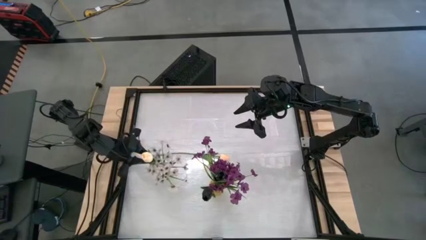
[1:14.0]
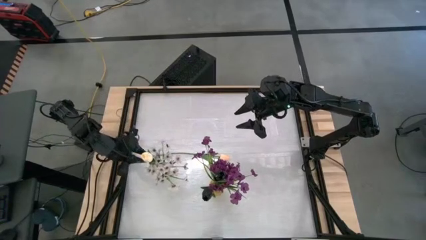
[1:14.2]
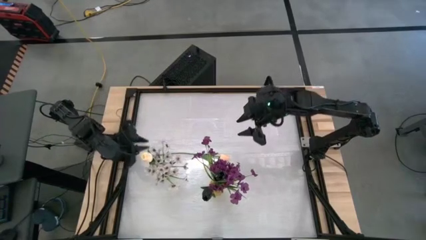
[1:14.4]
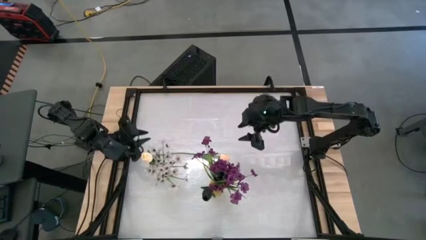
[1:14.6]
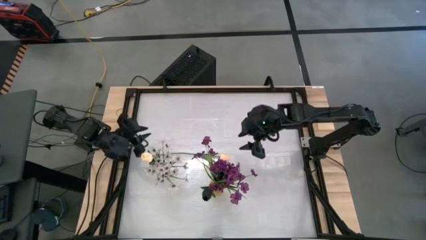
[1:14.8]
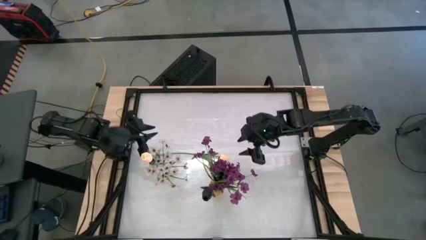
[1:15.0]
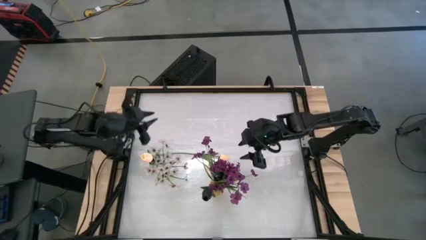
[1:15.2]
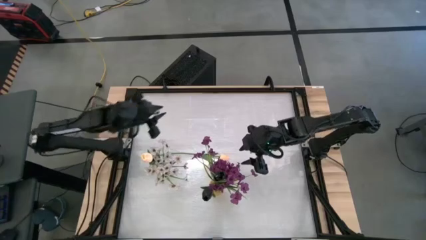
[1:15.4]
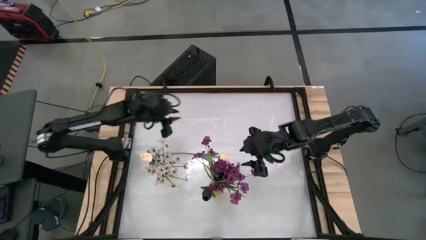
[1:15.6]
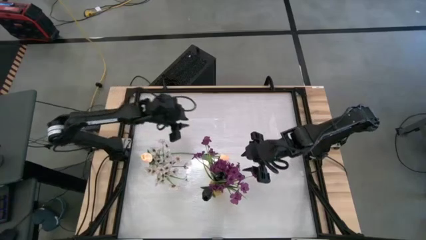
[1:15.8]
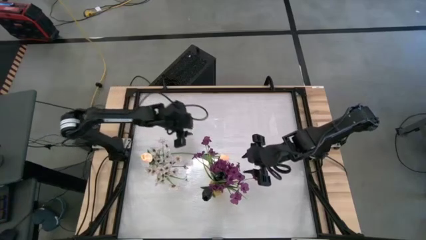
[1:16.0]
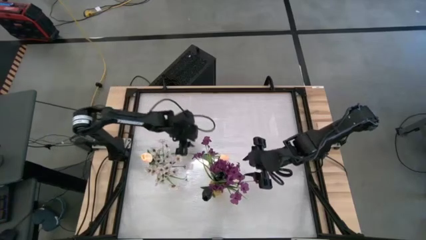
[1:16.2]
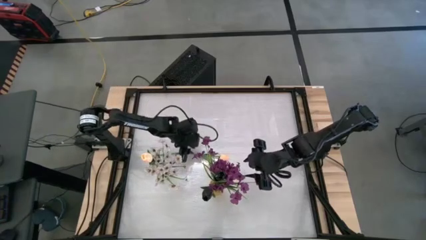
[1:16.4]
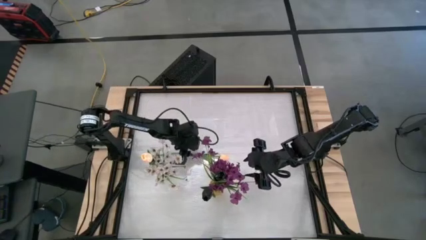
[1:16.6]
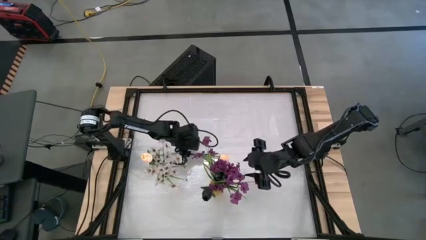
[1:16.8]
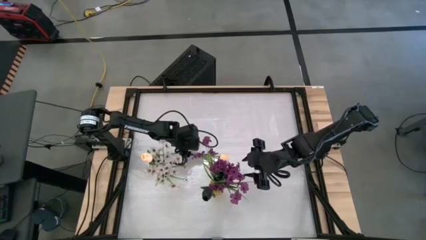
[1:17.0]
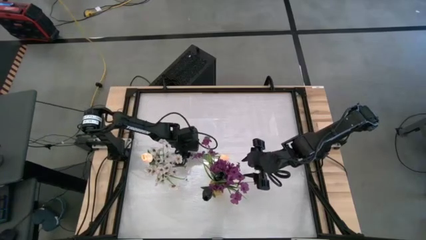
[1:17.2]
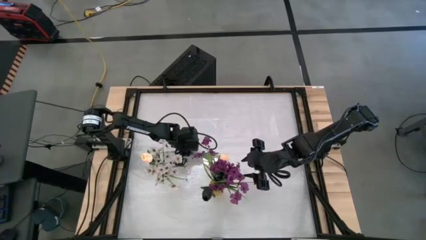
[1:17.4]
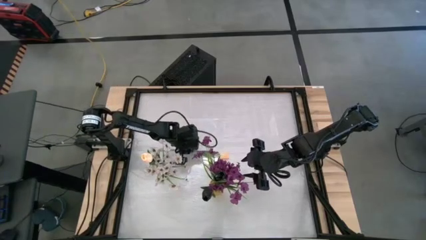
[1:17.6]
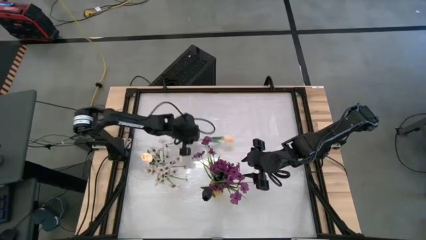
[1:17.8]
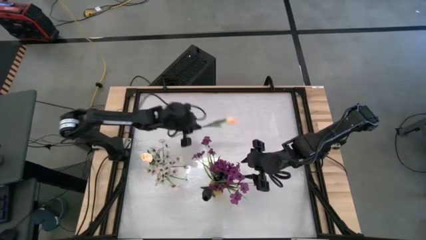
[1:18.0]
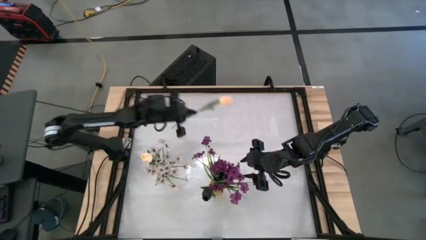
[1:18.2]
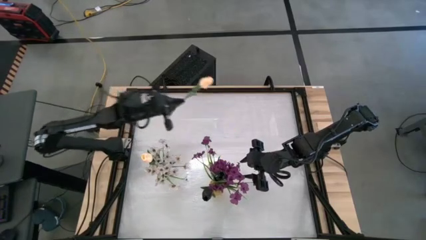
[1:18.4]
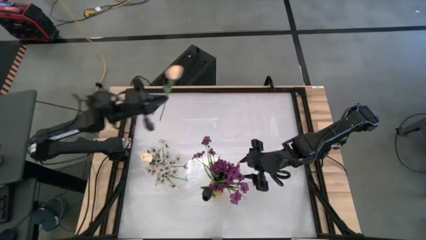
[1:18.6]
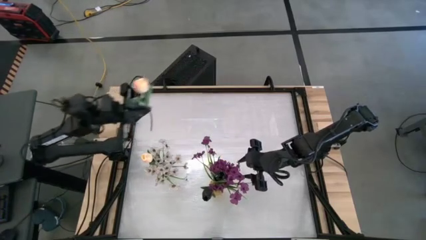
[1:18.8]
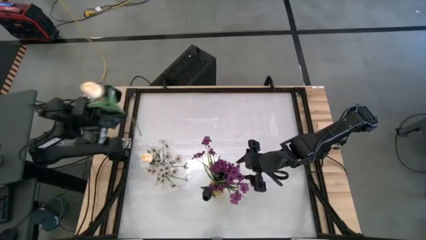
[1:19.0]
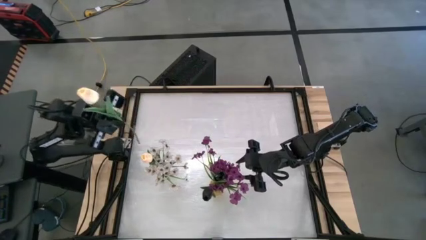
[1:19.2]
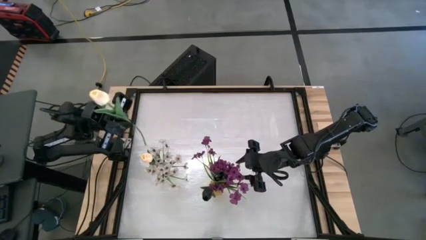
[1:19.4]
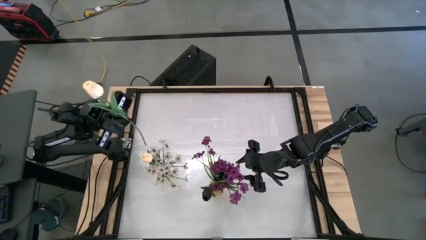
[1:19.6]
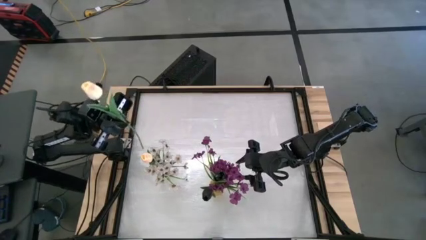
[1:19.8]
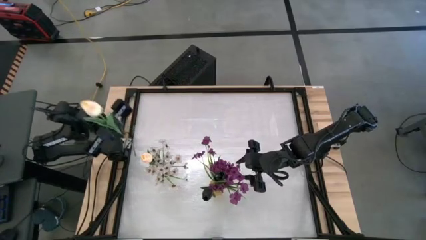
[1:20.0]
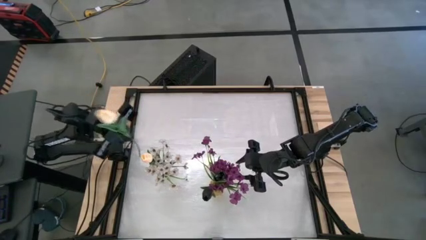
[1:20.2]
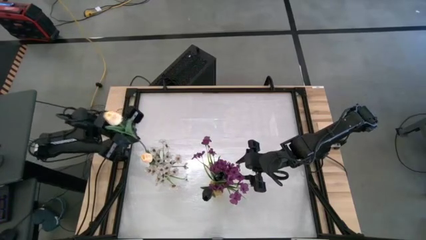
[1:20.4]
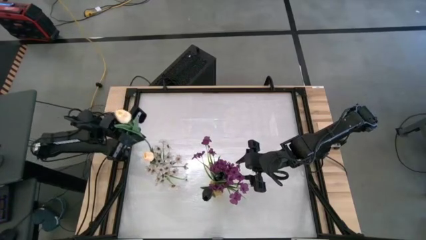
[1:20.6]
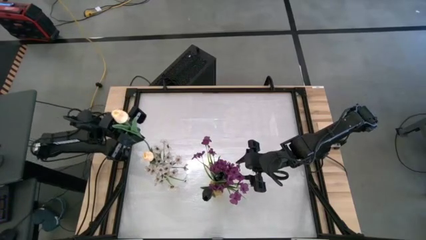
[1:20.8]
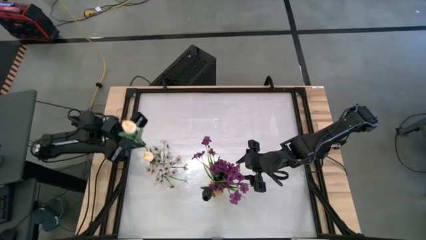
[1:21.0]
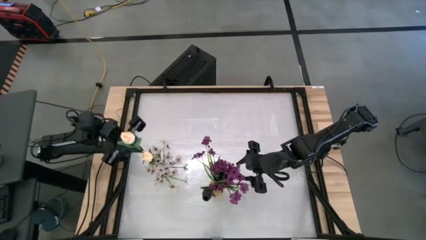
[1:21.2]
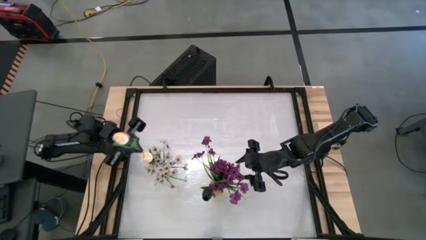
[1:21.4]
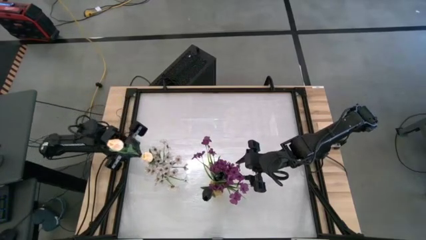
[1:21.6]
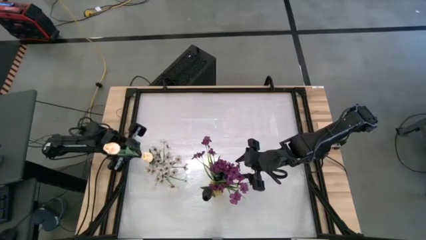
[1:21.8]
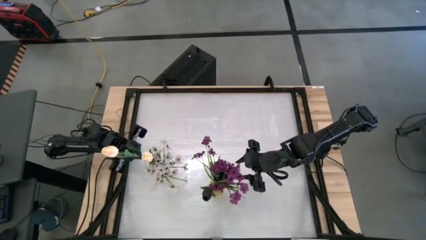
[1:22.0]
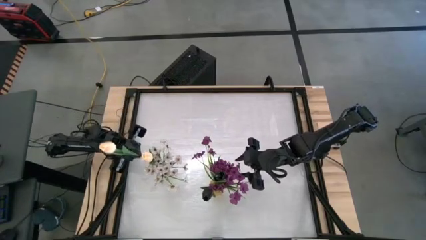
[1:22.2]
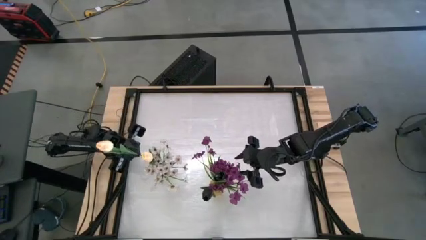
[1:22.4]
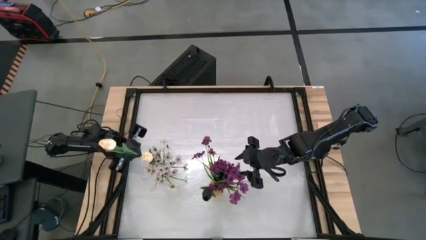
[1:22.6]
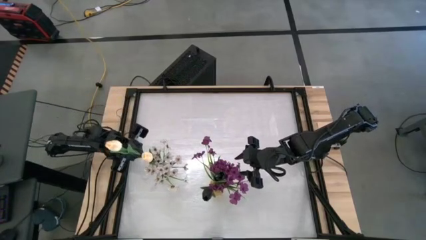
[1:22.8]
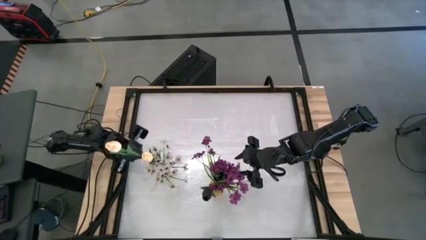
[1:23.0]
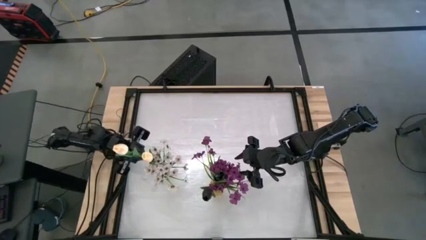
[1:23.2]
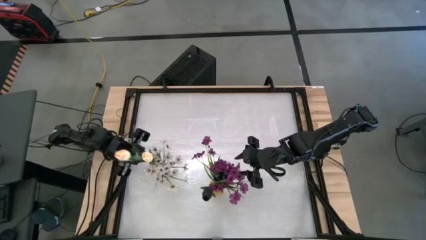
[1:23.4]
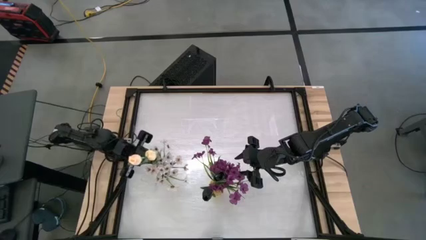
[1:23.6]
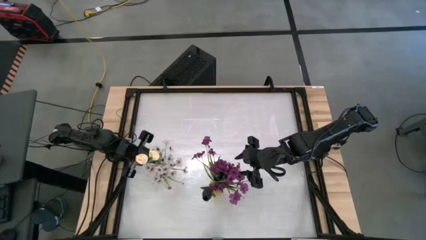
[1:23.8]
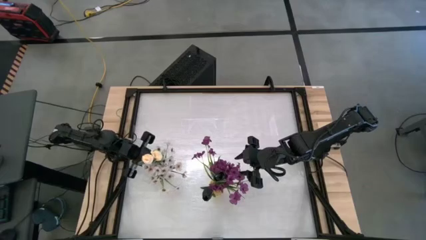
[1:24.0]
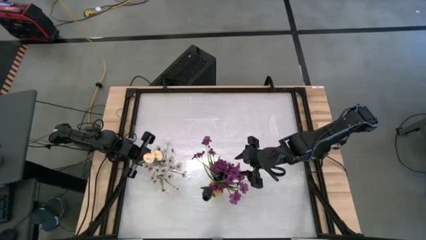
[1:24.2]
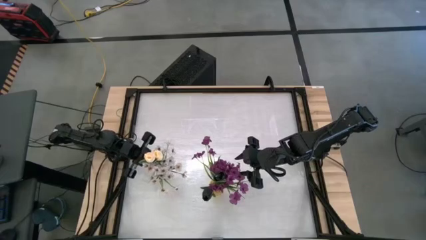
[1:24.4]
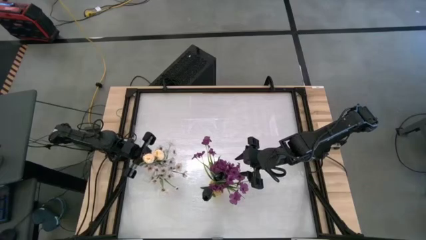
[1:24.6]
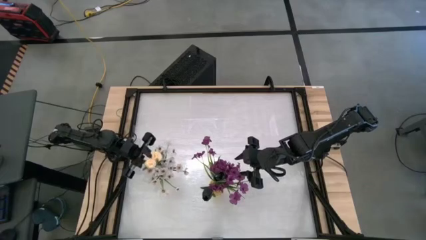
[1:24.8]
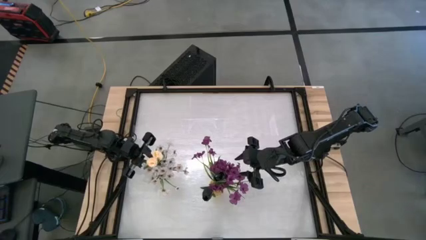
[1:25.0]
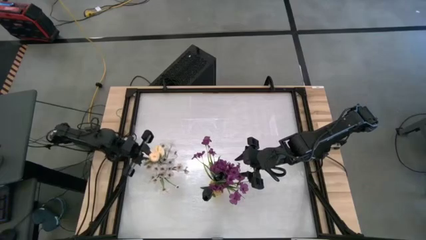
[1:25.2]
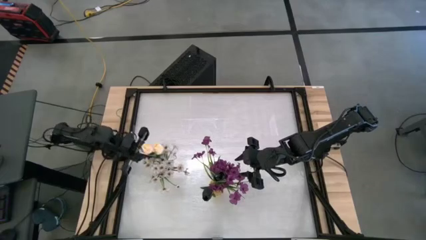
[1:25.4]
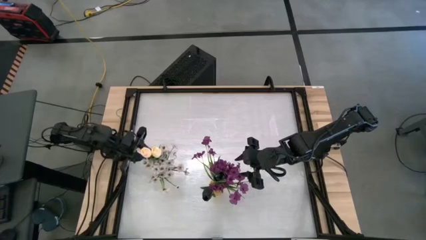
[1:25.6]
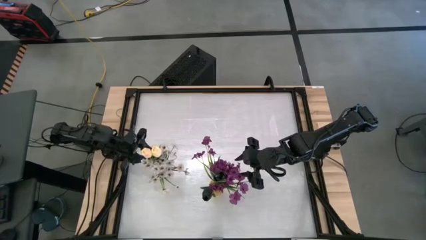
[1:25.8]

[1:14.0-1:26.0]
Task: Sort flowers into vase by color
Put the light pink flower into the transparent vase

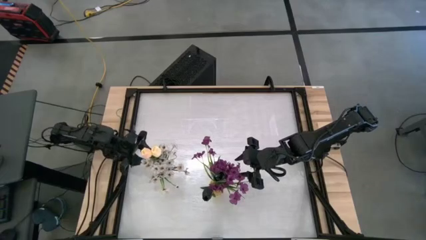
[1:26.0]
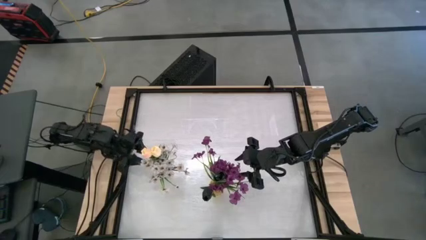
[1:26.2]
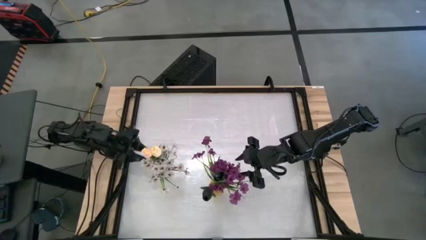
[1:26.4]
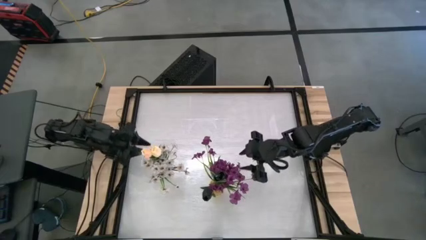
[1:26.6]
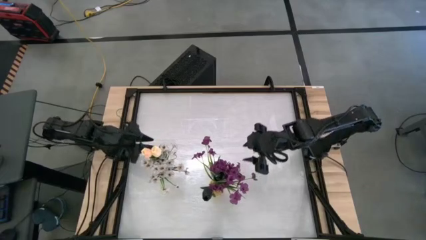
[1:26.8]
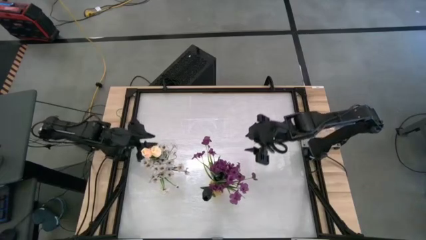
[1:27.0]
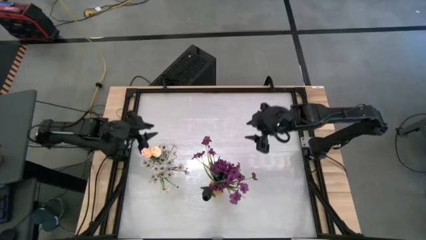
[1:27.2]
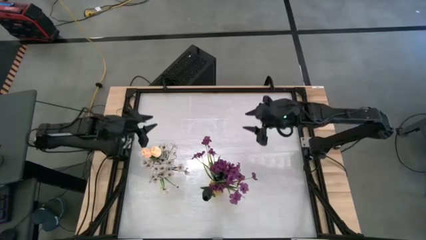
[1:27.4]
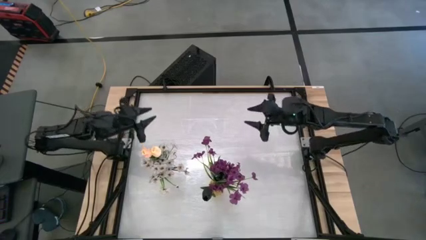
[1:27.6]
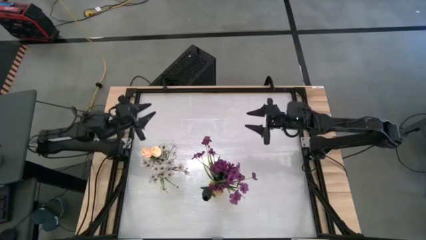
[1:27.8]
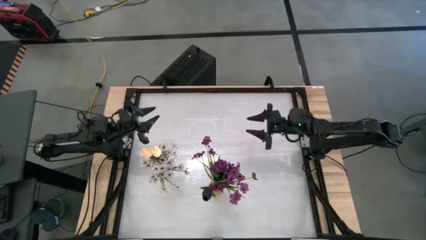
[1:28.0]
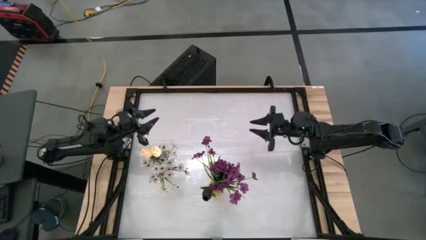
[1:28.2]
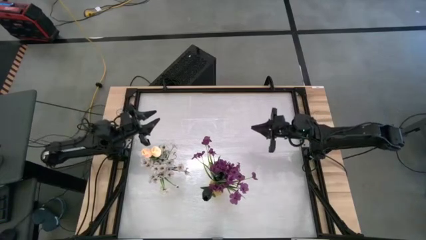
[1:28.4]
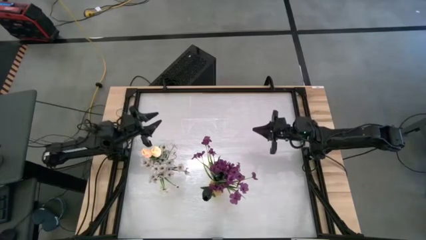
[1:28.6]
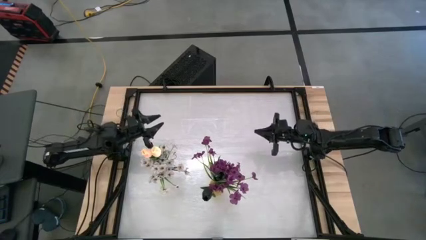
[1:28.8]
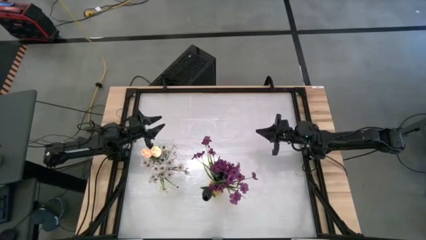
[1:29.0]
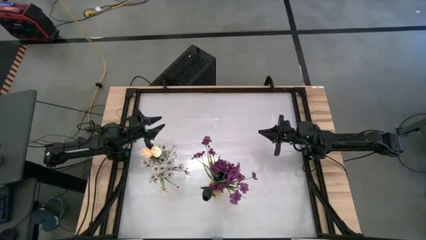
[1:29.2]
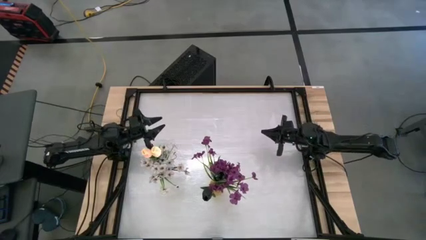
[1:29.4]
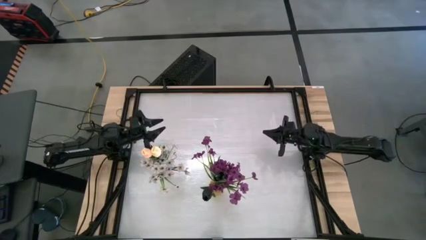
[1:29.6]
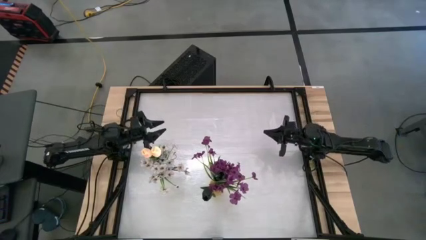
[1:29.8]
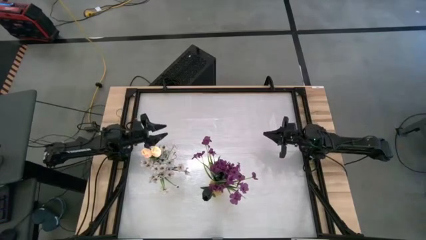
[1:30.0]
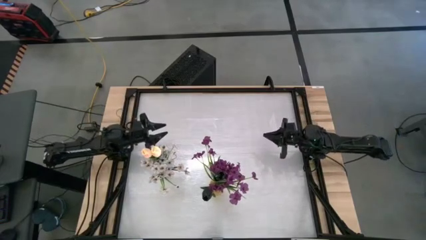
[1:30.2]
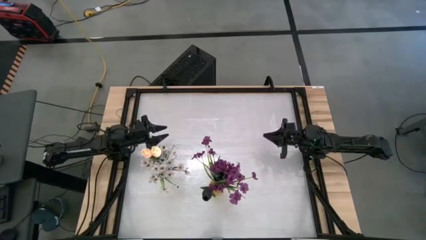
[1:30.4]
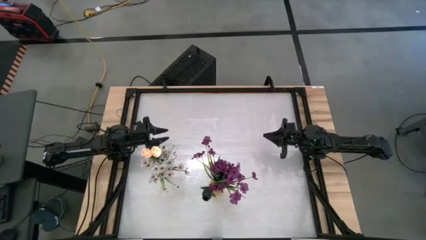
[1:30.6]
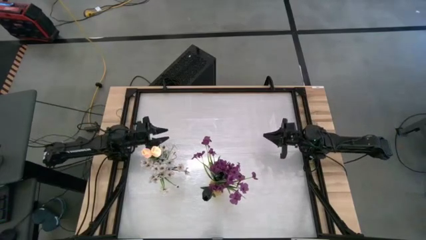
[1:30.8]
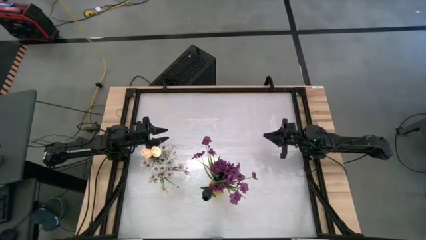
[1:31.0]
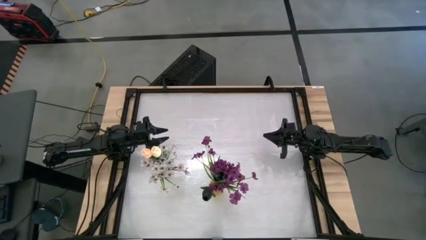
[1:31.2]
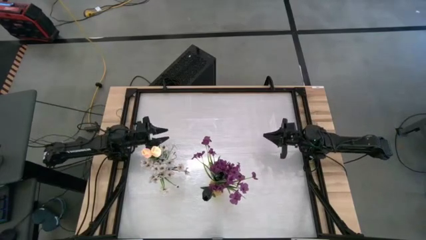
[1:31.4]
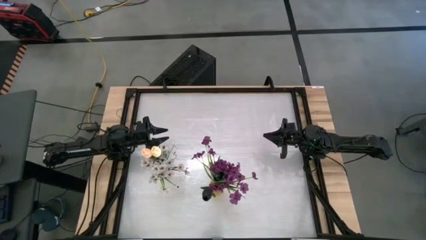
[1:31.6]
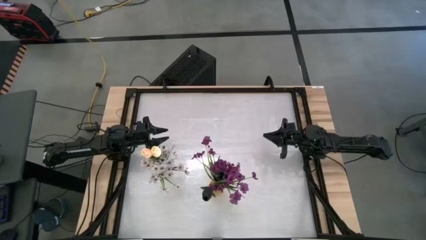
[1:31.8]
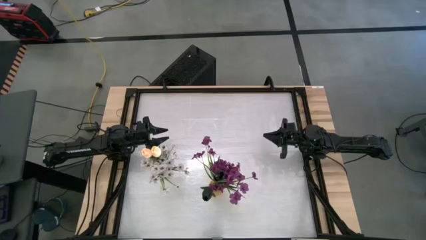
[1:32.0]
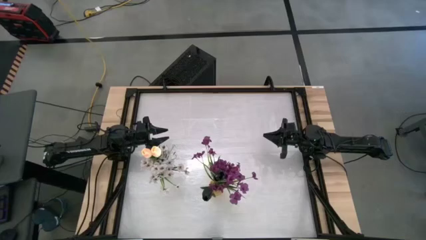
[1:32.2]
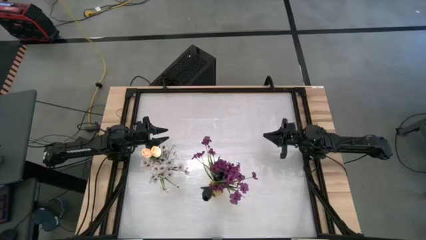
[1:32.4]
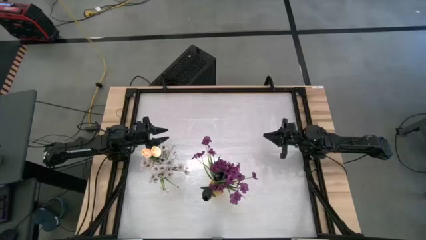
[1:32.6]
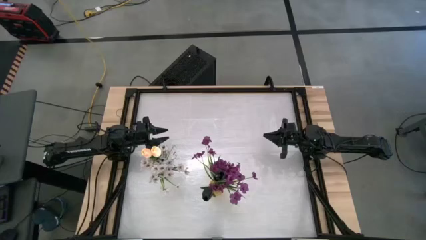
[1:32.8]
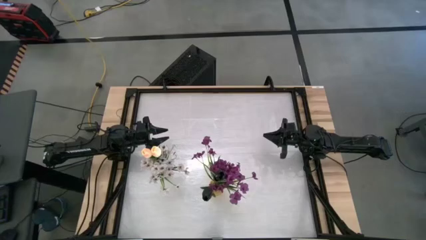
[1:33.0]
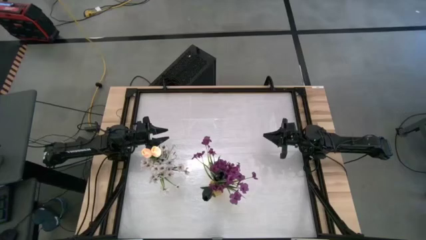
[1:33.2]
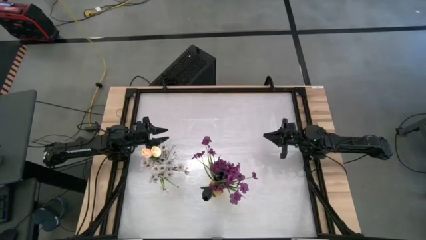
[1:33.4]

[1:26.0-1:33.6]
Return to Home Position
